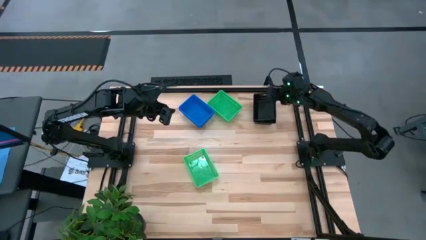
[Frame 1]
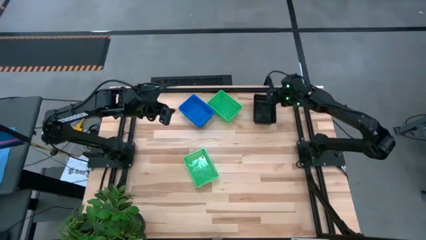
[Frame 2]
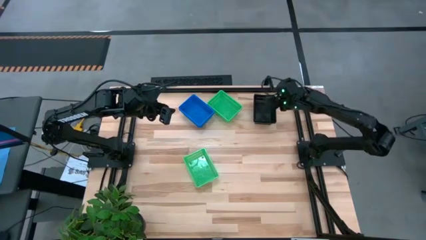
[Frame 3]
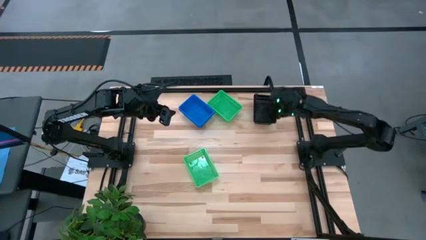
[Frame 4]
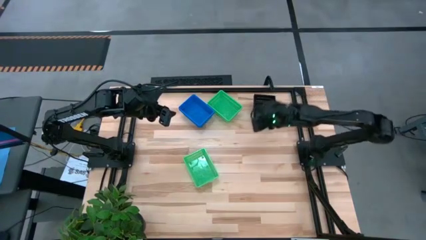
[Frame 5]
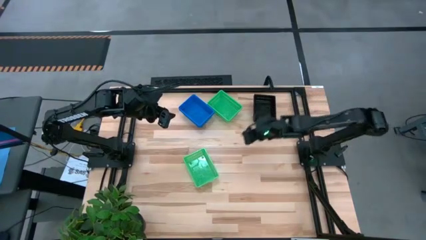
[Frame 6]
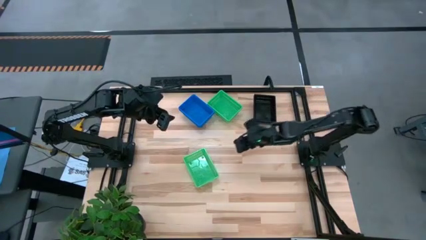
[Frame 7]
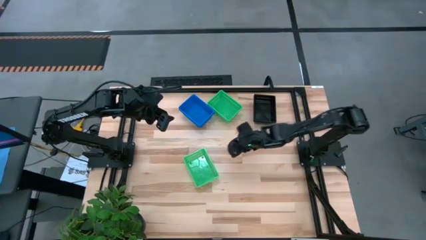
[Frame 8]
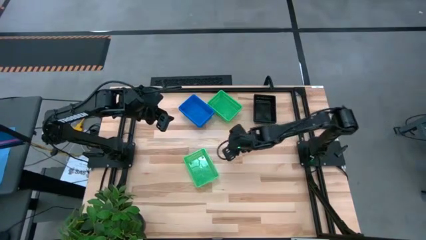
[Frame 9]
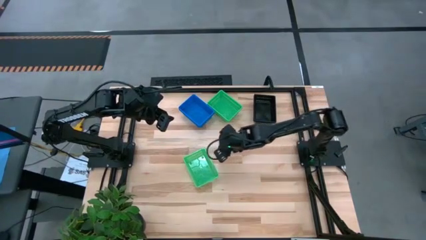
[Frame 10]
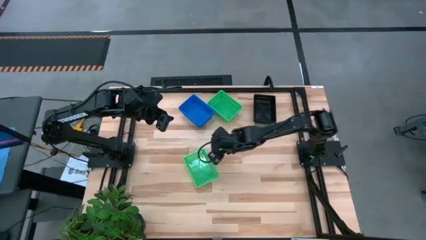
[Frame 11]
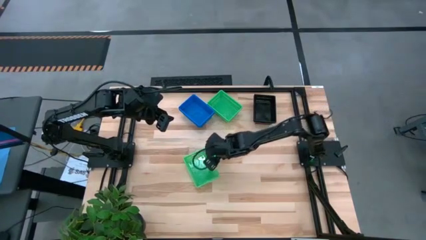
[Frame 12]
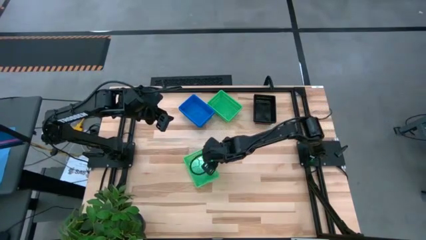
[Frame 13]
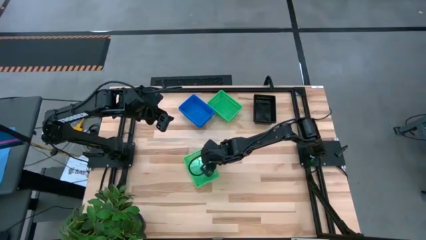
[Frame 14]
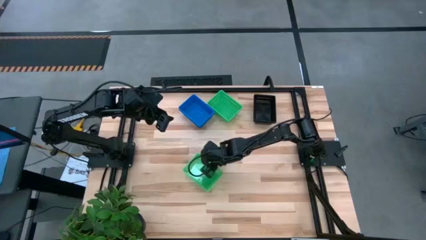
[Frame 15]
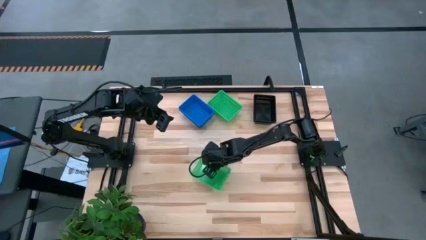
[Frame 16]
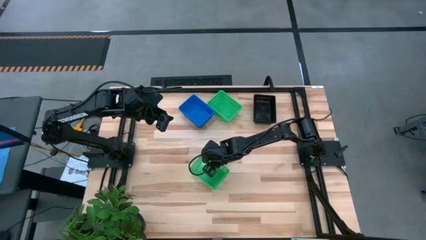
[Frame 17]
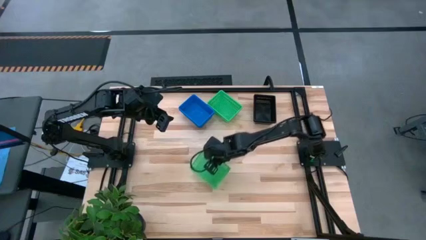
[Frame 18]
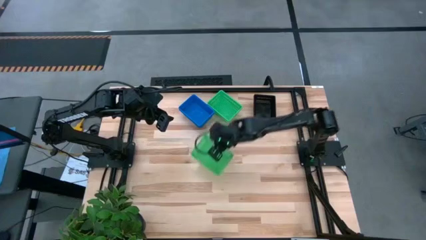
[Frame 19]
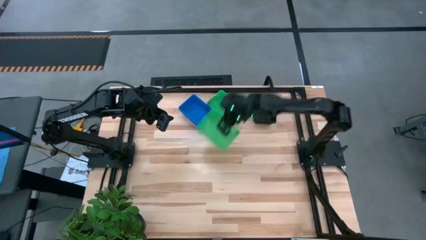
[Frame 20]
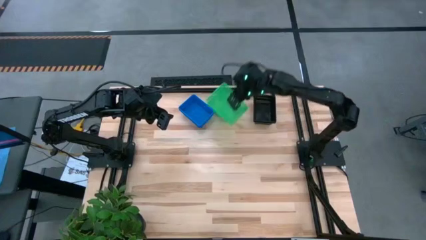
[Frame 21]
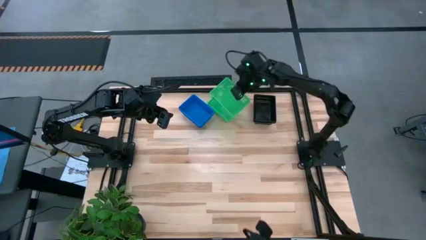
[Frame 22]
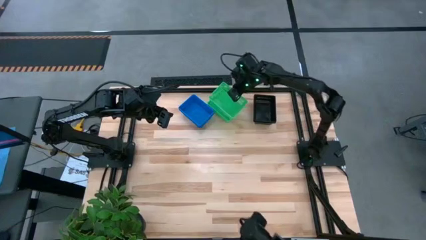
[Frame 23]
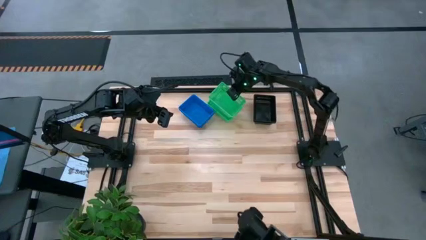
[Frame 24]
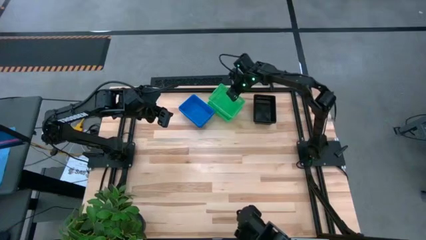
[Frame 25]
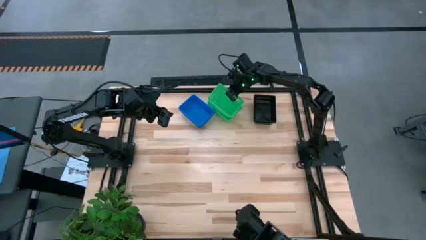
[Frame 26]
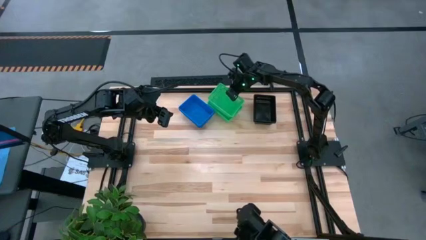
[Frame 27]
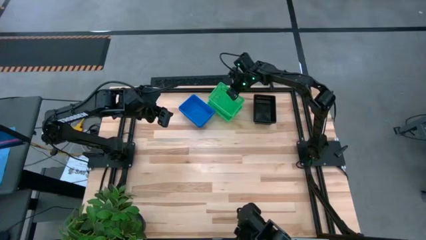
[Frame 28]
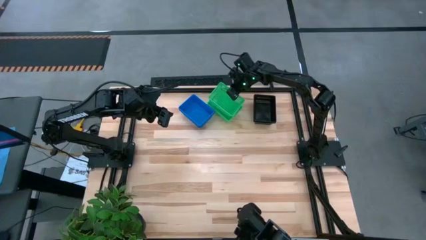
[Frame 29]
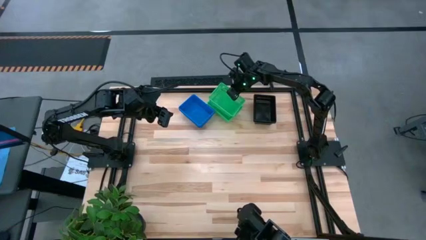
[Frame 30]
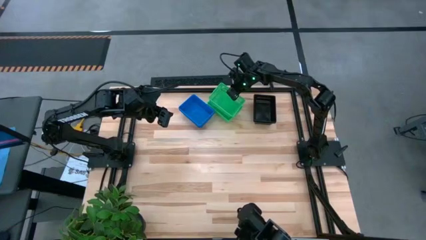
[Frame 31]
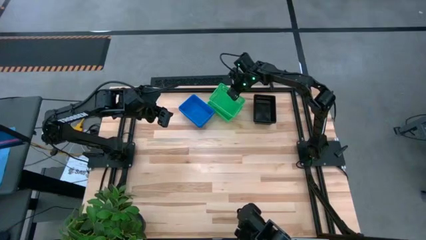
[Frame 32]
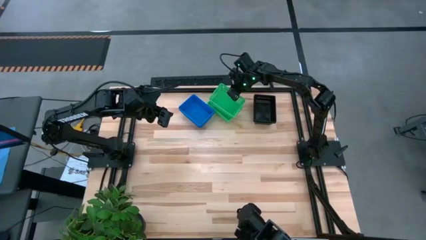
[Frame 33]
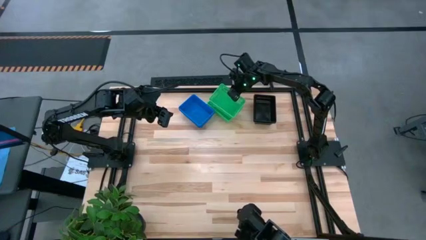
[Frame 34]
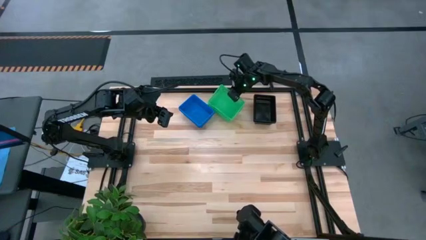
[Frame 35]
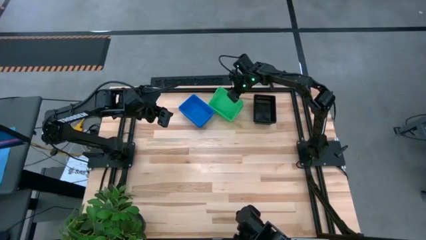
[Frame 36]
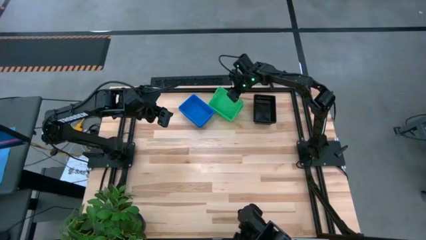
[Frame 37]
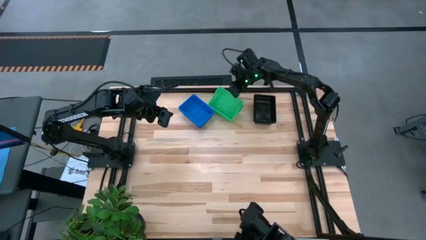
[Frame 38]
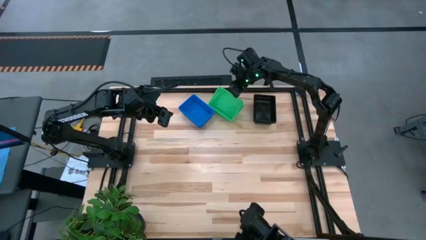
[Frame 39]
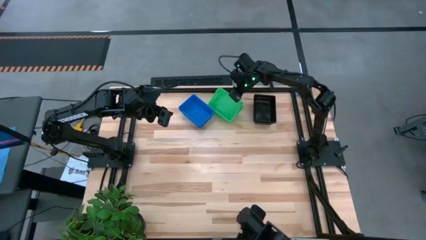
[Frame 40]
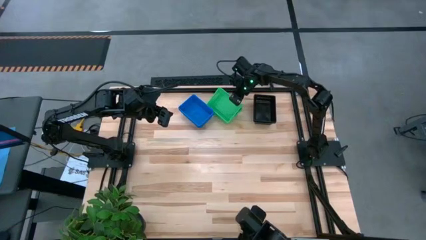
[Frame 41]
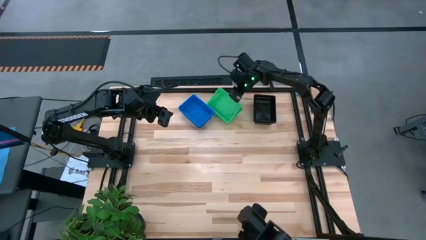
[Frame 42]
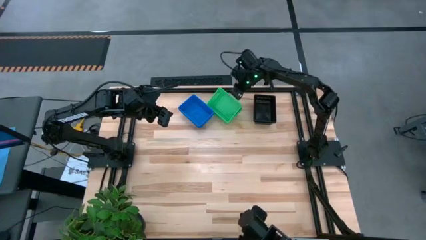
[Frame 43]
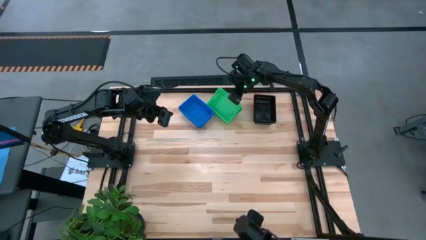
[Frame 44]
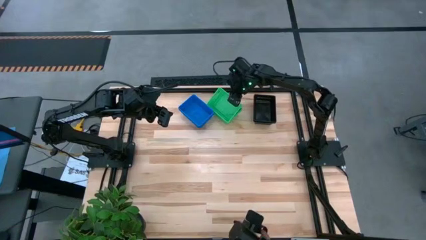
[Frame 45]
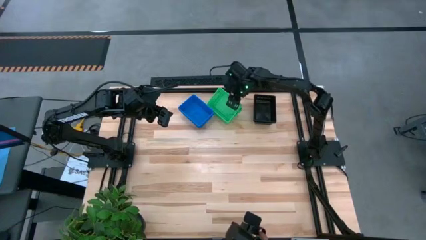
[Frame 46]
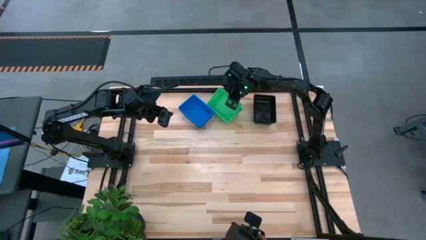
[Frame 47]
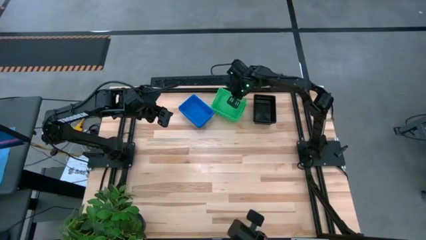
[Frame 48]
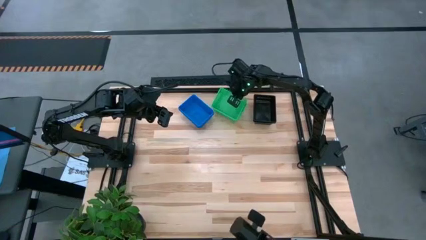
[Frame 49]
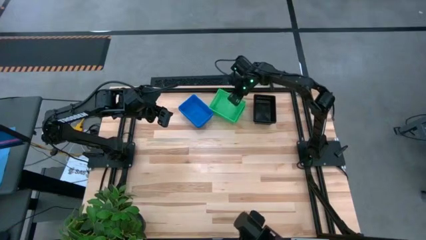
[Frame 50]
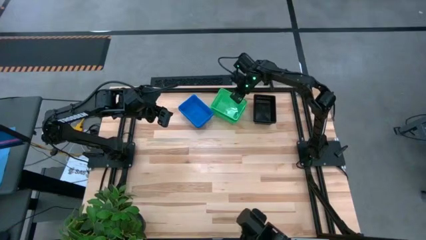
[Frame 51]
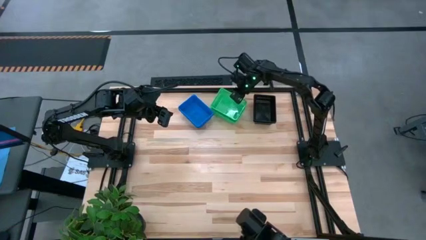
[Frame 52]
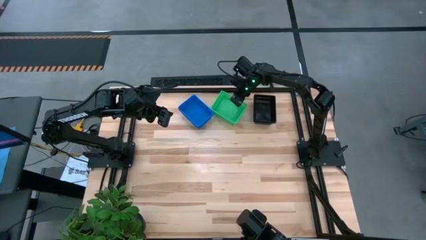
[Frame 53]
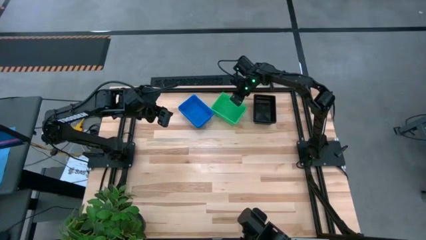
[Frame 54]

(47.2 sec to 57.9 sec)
Stack the bottom green bin on the green bins
